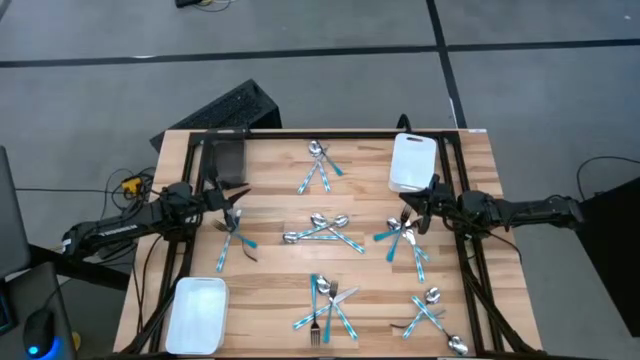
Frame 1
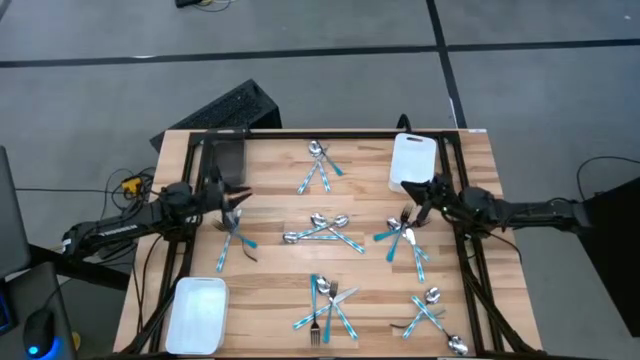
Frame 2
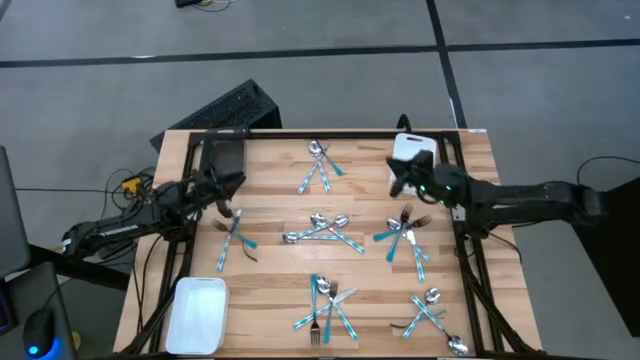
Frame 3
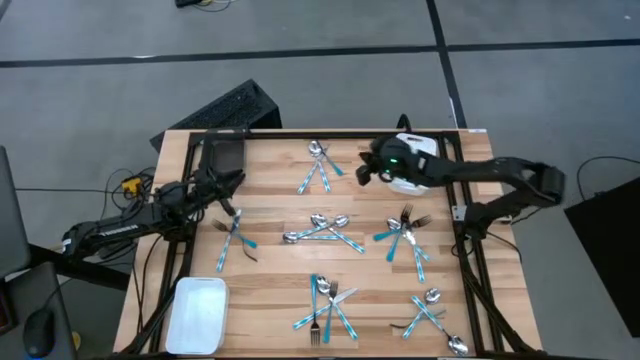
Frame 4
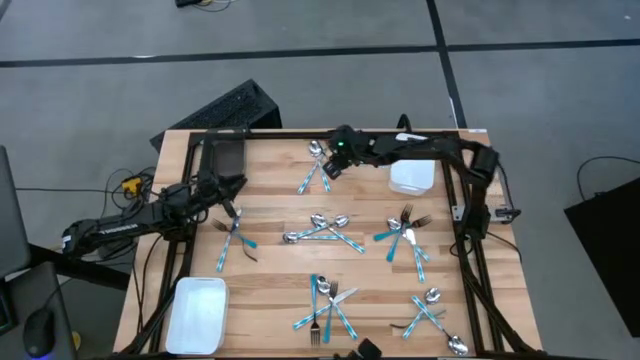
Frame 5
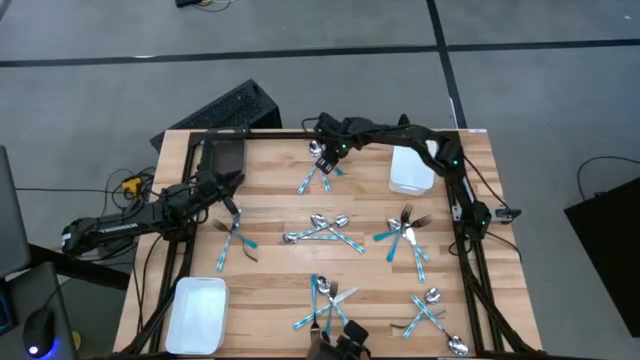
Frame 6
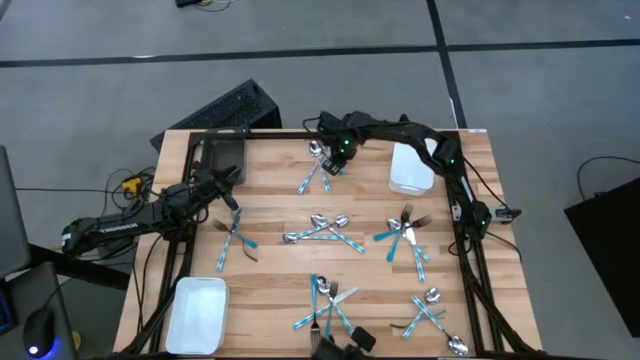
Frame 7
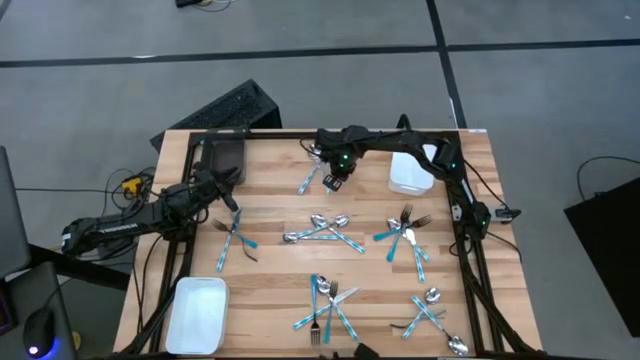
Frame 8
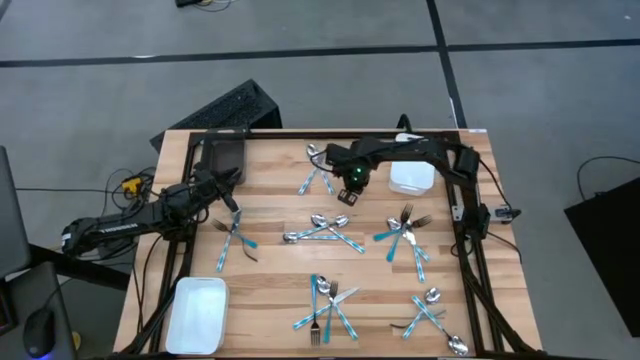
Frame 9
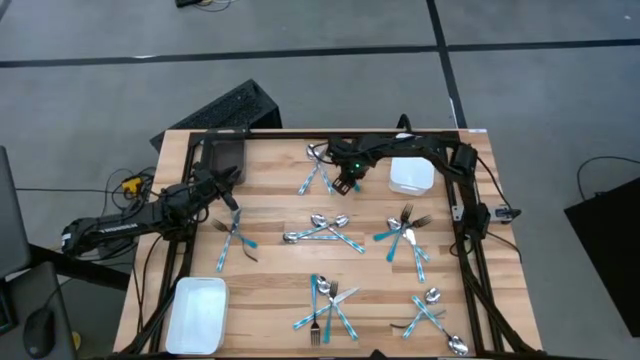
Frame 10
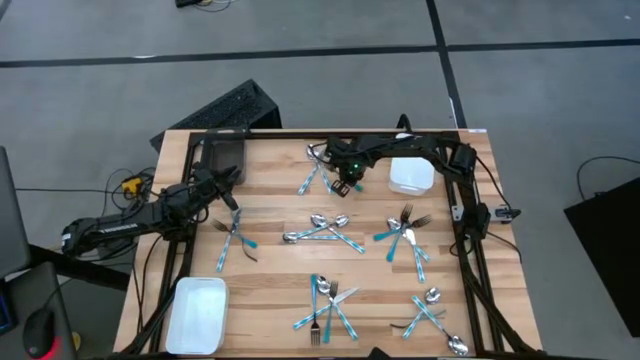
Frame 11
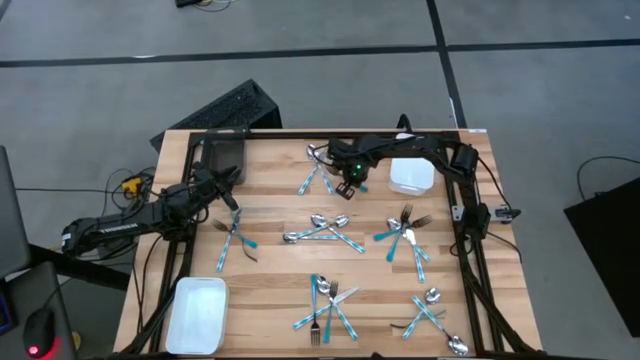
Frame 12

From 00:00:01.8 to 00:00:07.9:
Task: Sort silverware by color (type)
Put the blue fork into the top white bin

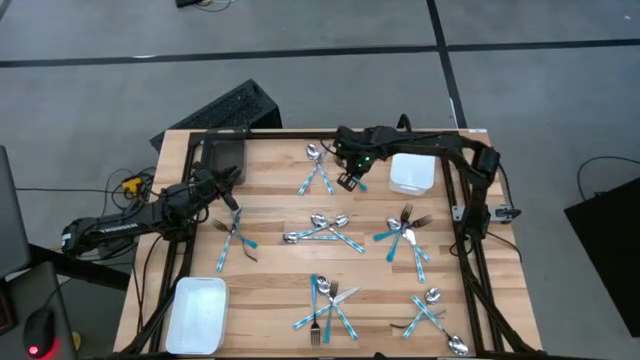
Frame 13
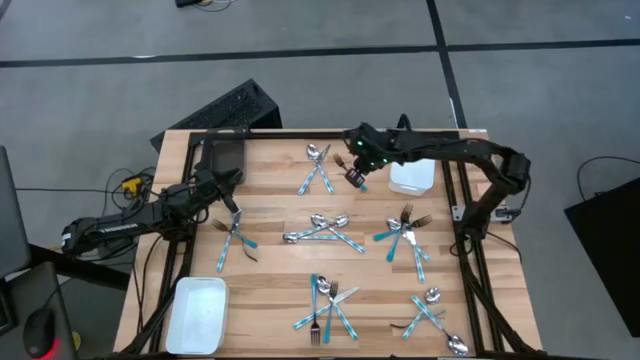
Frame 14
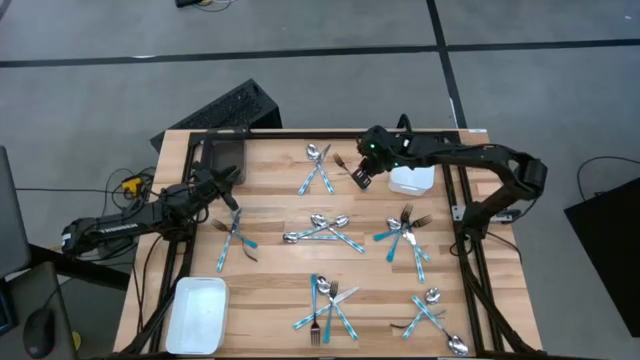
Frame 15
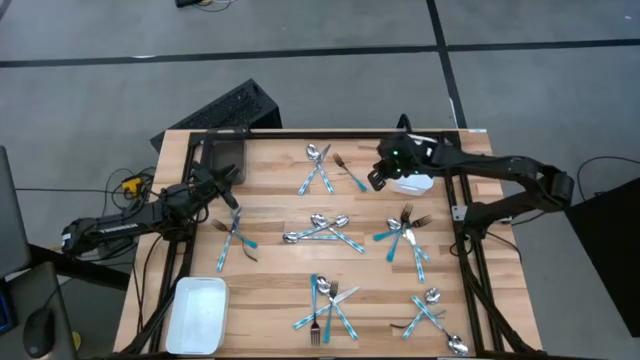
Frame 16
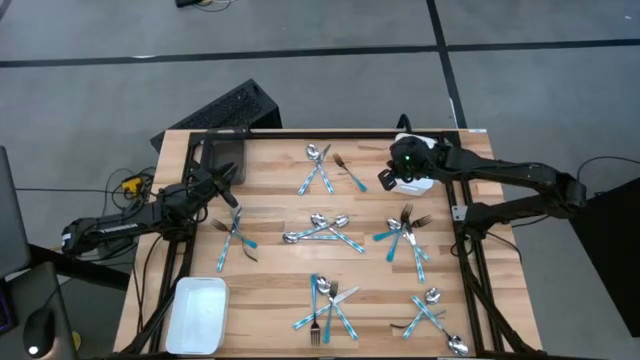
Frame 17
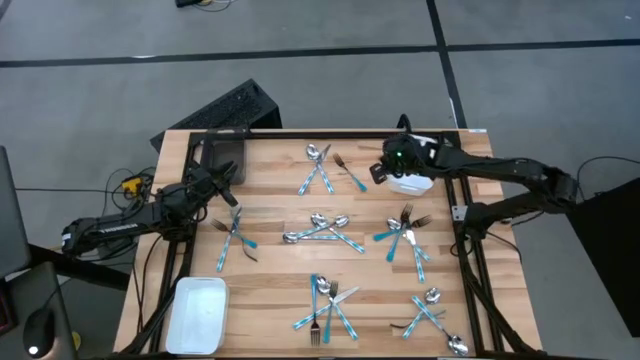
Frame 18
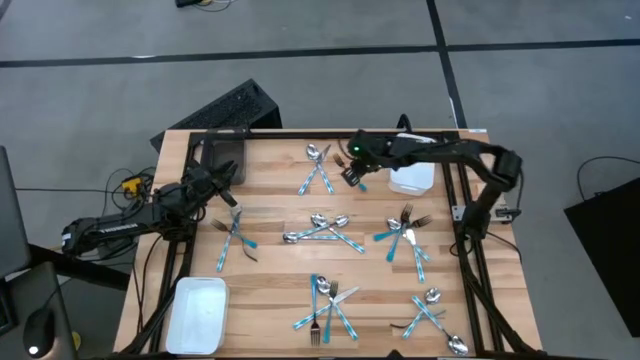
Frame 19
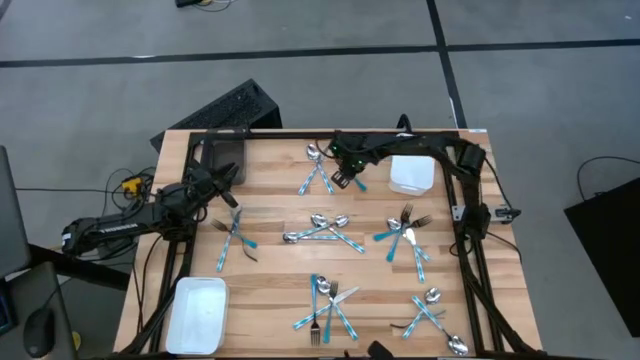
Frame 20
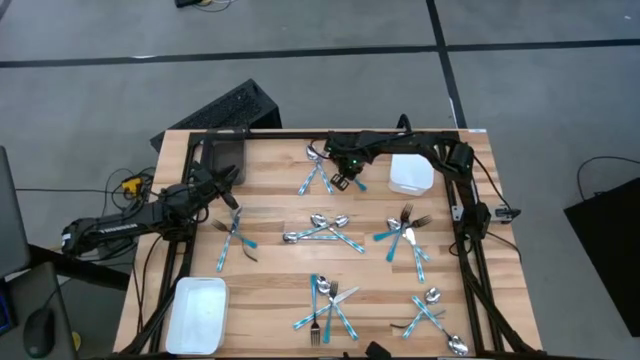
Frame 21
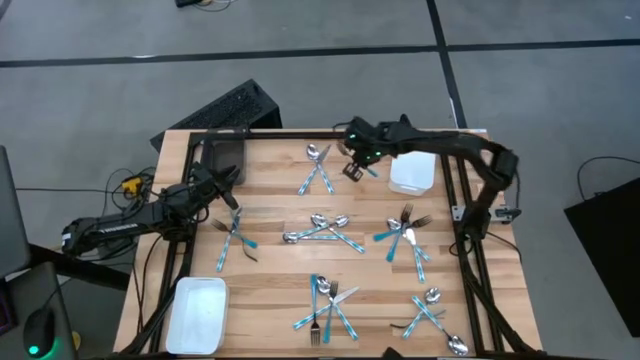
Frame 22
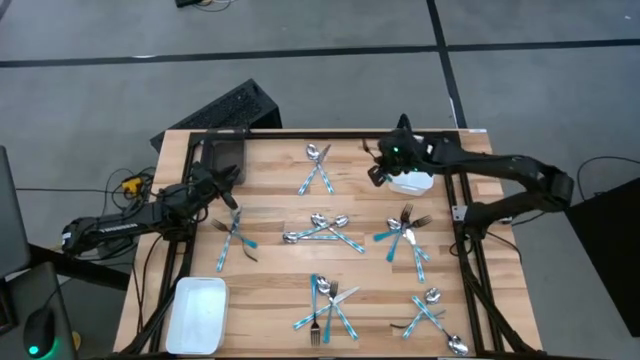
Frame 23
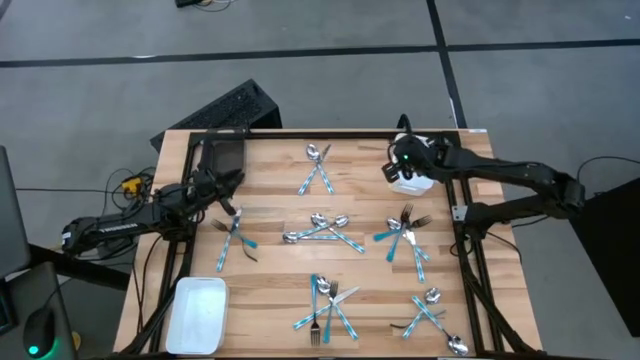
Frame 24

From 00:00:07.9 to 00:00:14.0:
Put the blue fork into the top white bin

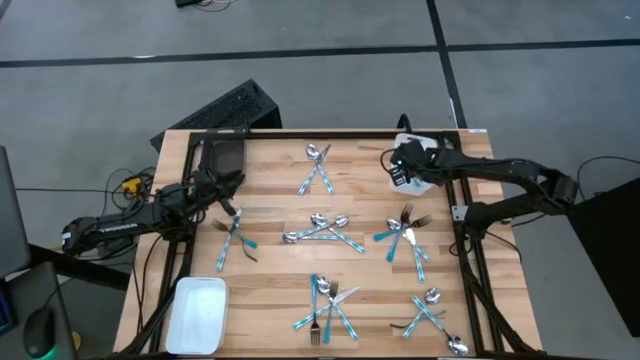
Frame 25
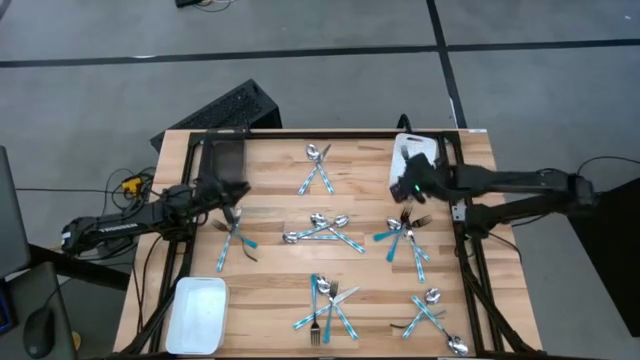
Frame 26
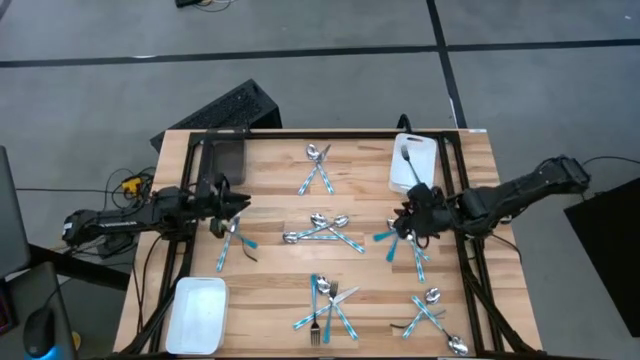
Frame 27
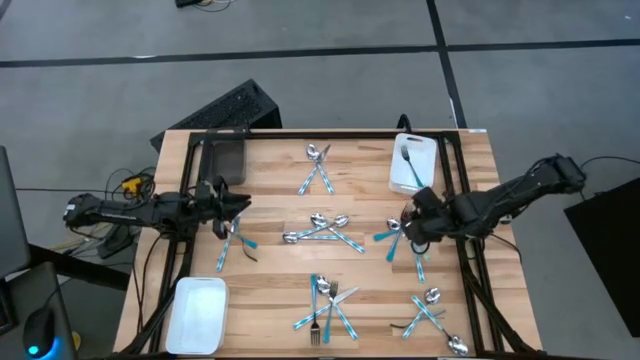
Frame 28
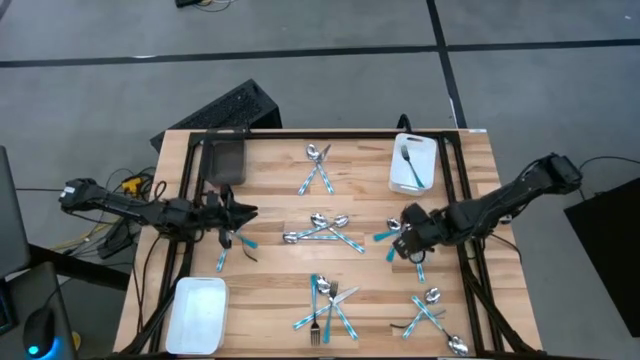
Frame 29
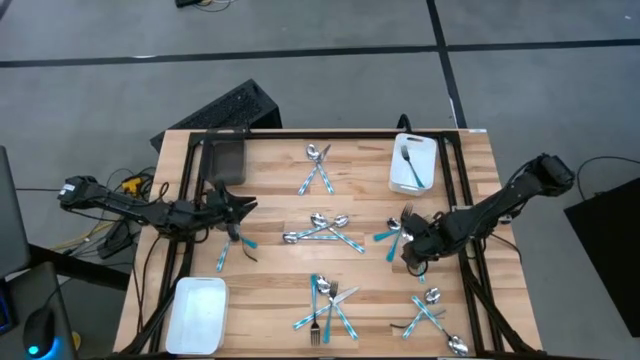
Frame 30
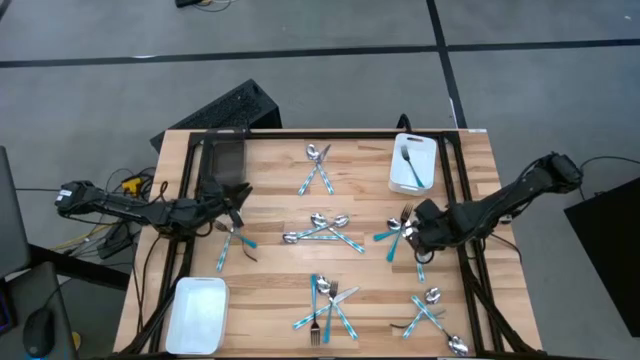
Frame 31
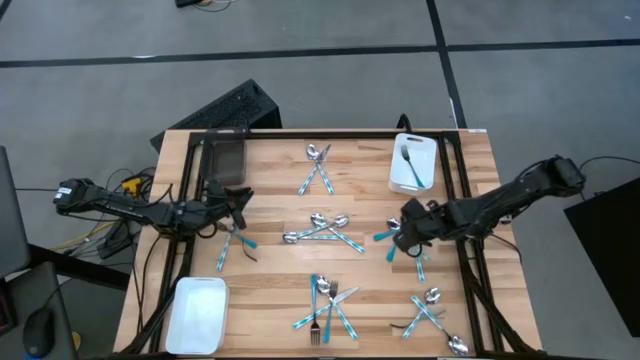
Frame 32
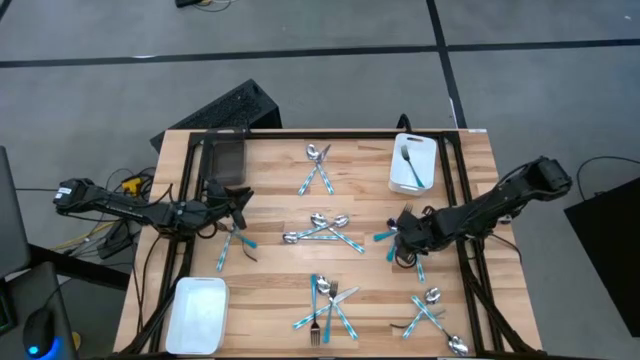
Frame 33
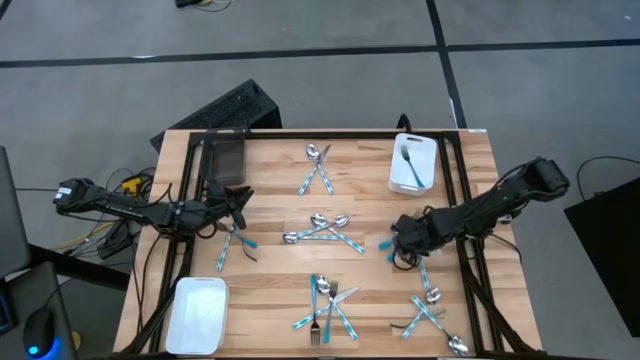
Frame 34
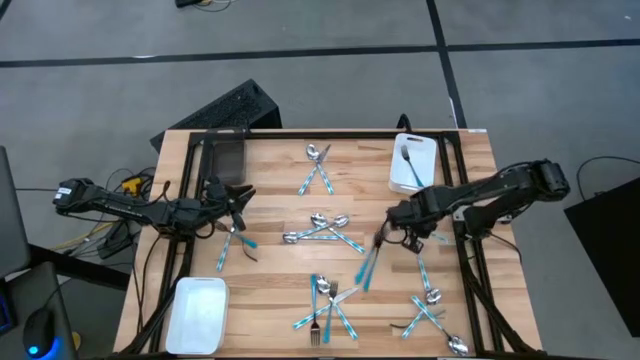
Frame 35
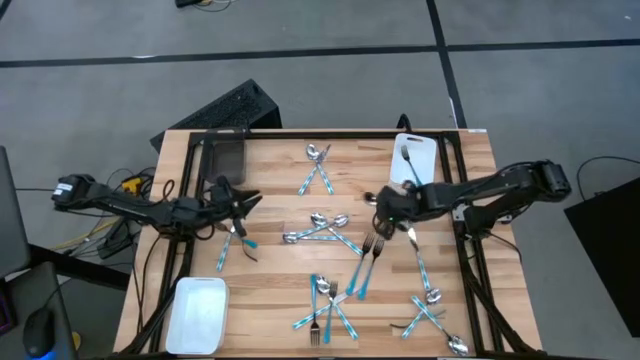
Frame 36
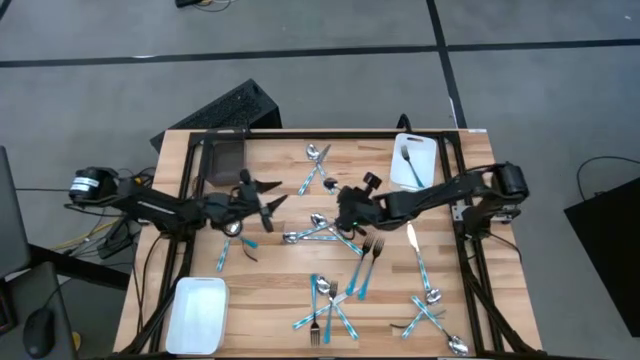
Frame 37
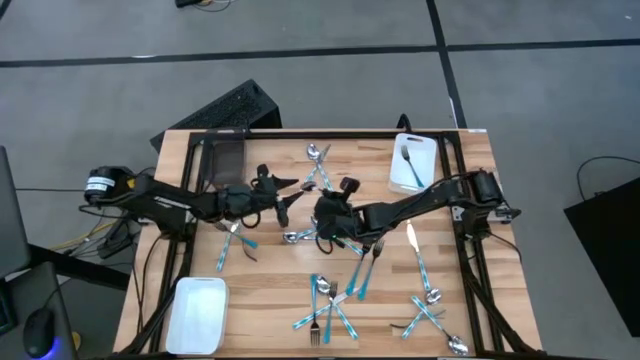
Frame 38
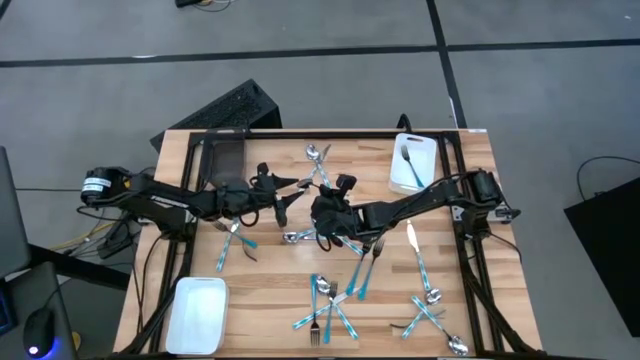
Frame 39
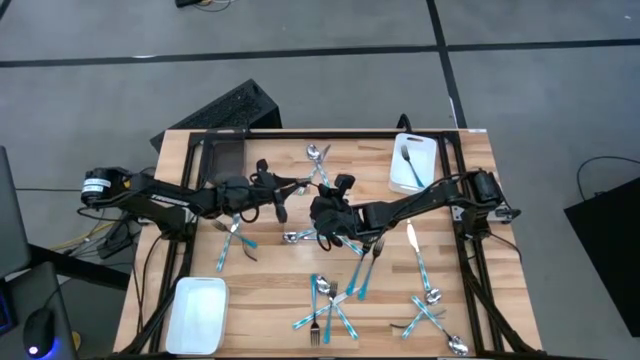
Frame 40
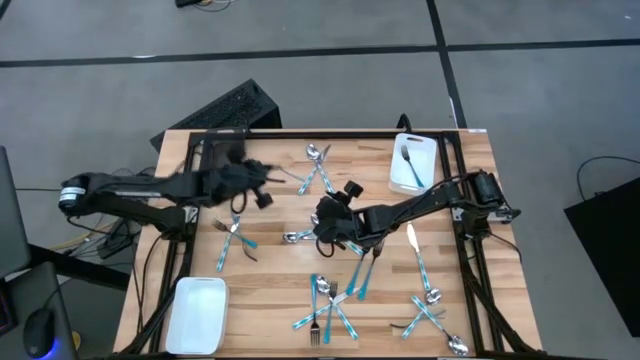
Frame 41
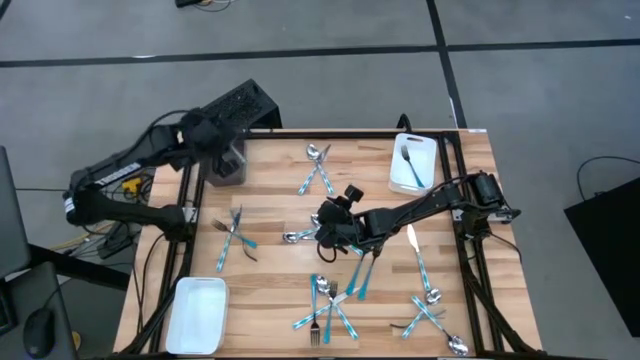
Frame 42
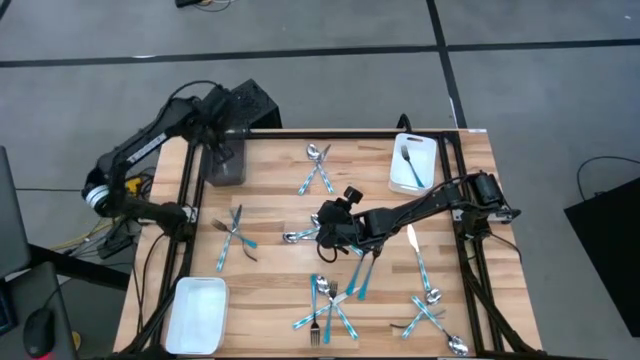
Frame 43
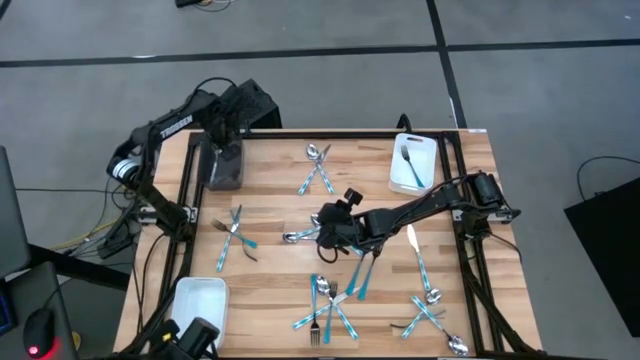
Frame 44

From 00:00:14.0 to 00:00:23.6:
Put the light blue spoon into the black bin
